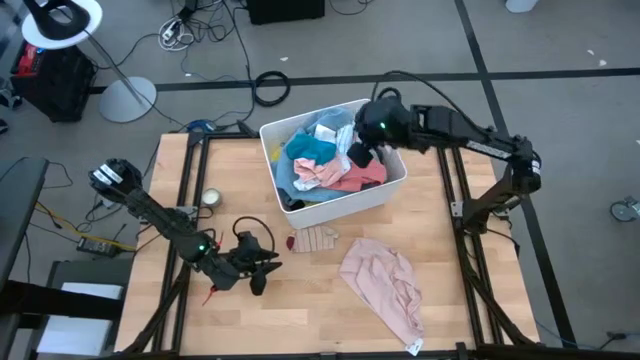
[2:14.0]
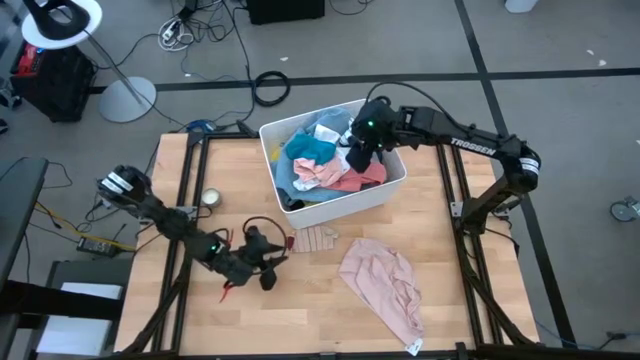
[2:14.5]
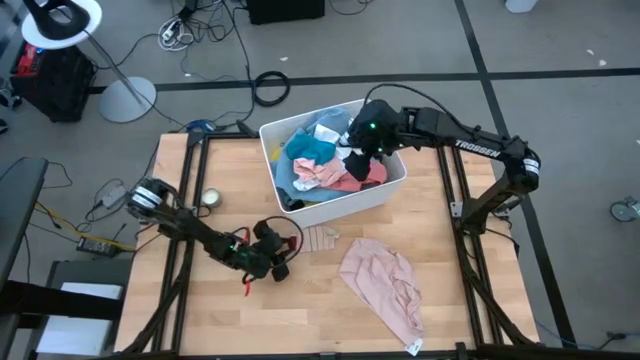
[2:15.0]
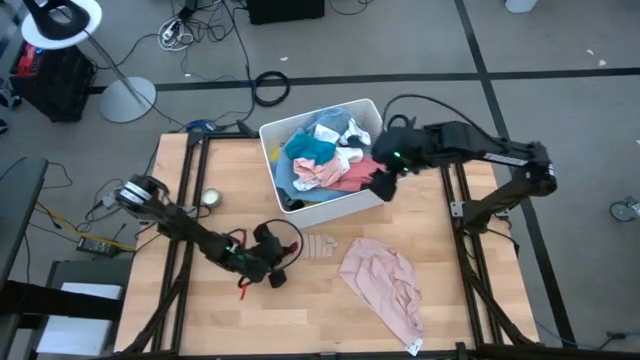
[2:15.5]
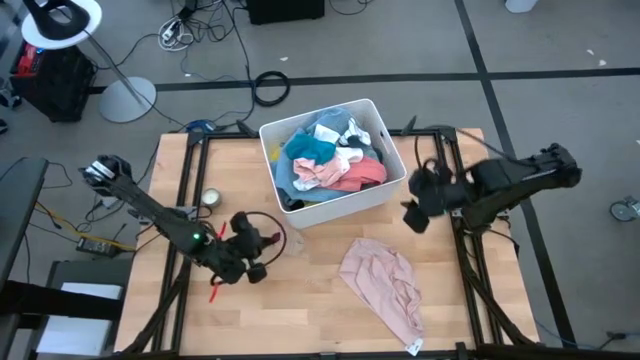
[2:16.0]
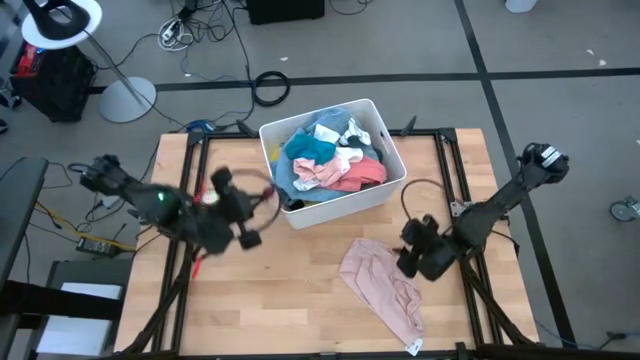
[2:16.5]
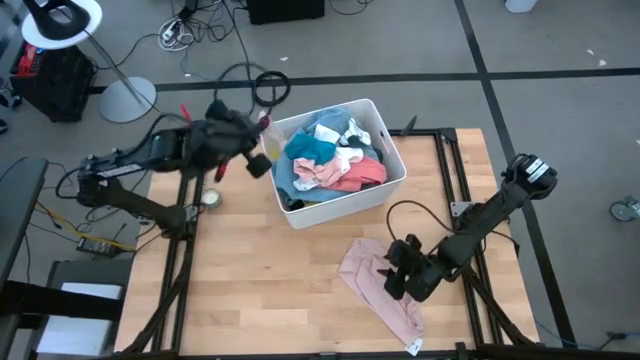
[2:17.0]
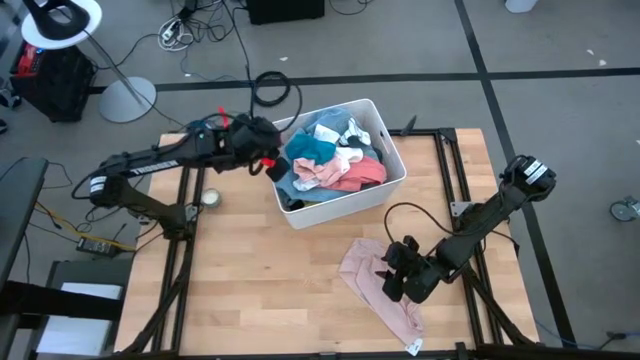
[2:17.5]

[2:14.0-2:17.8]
Task: Sort clothes
Put the pink striped sock into the white bin

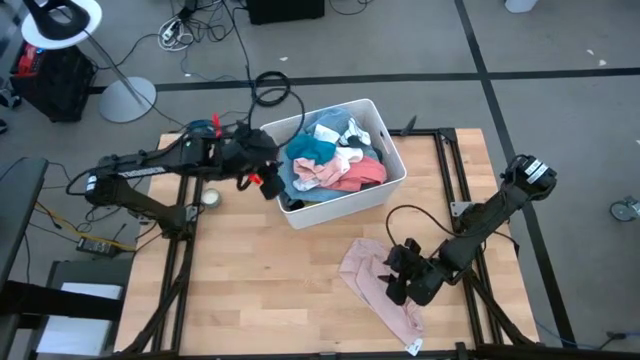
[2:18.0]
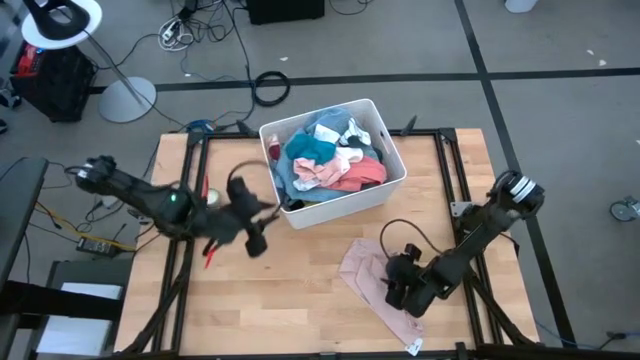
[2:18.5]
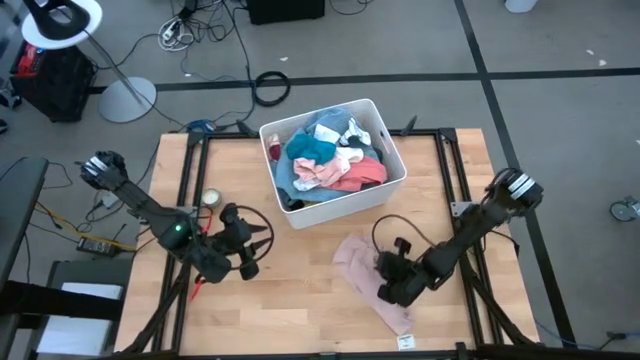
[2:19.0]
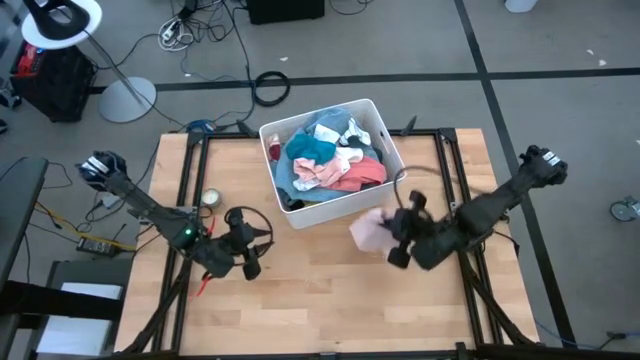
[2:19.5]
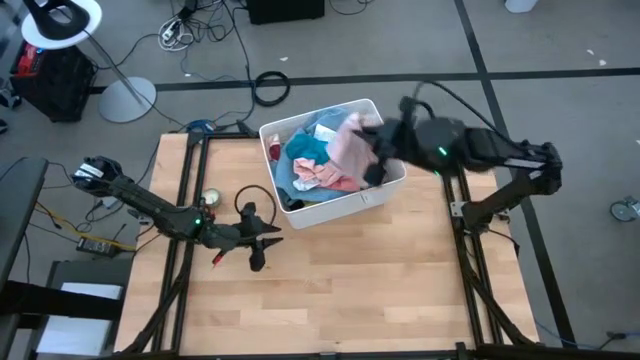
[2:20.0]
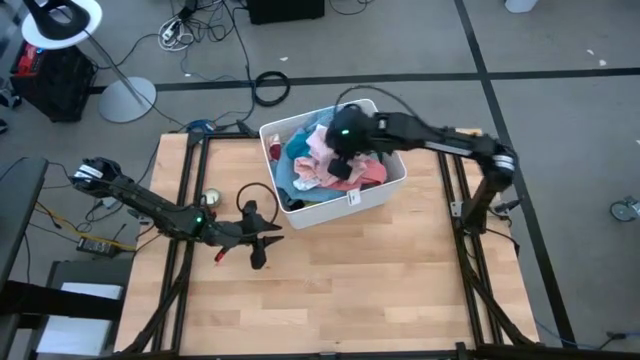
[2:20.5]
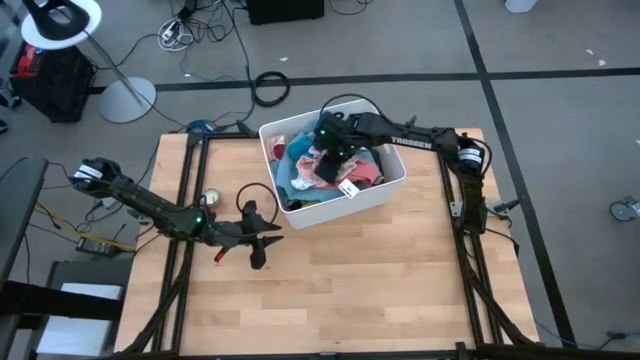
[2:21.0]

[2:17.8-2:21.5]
Put the pink underwear into the white bin

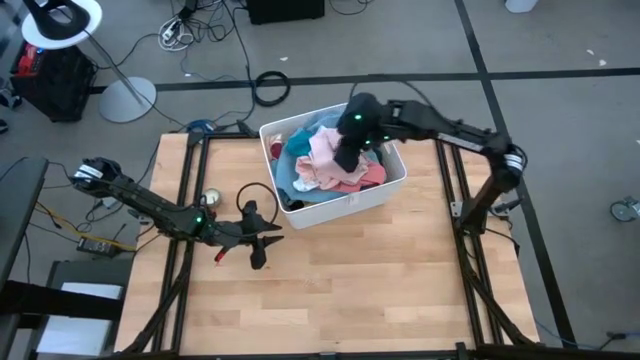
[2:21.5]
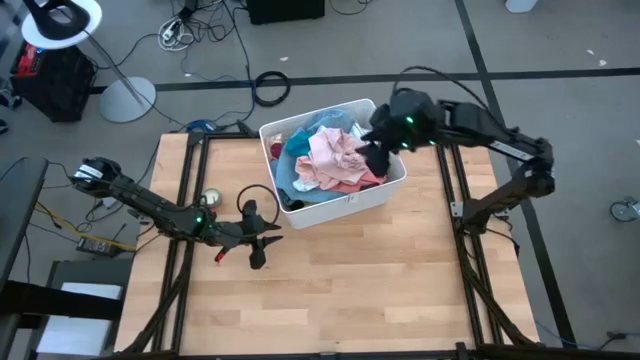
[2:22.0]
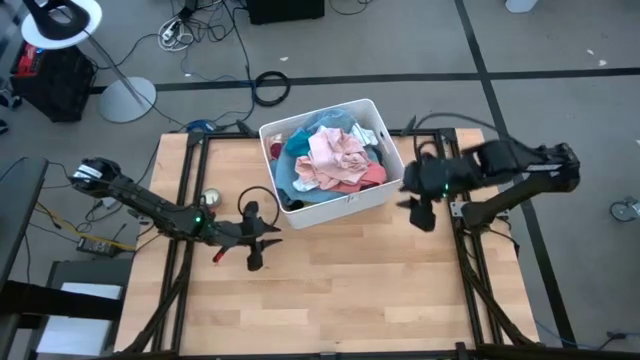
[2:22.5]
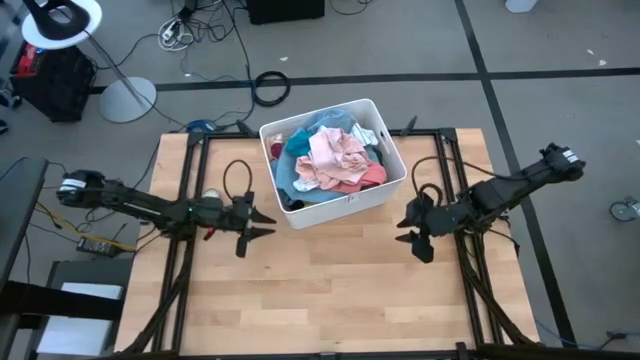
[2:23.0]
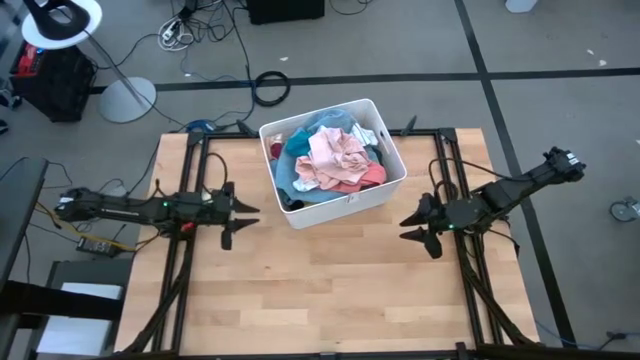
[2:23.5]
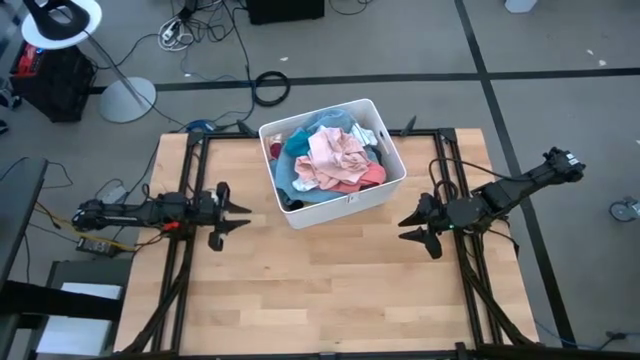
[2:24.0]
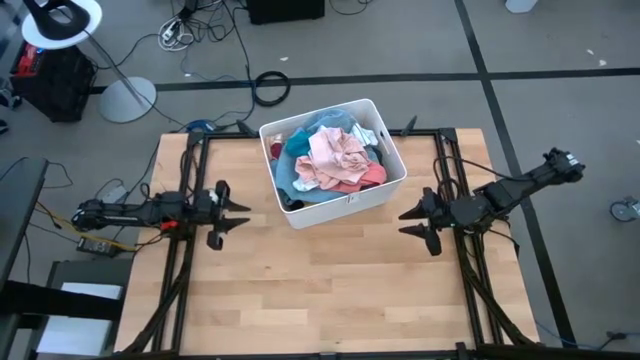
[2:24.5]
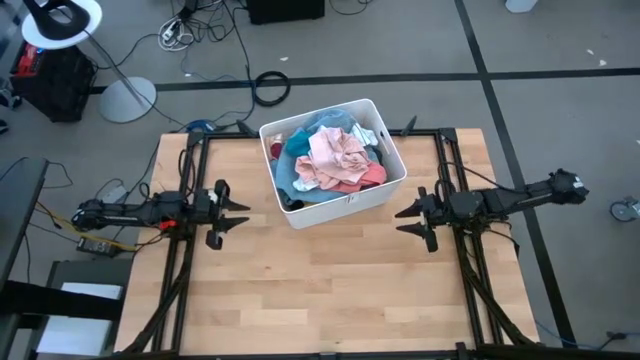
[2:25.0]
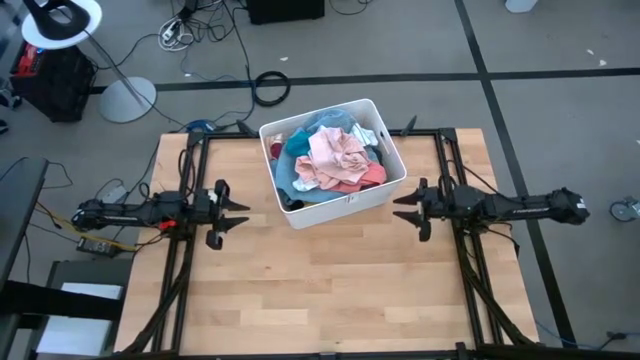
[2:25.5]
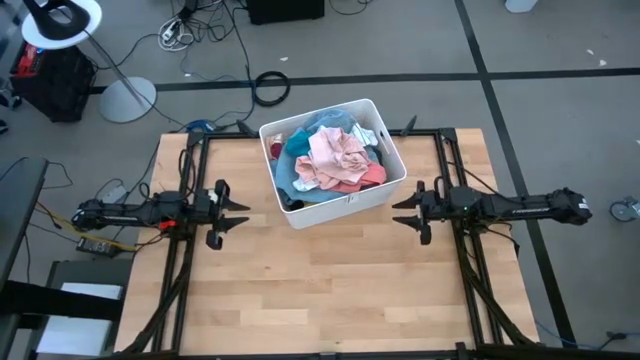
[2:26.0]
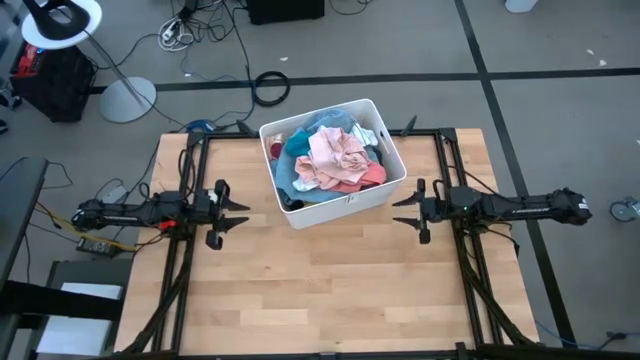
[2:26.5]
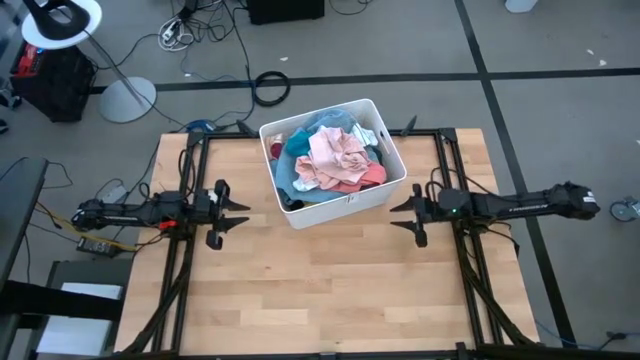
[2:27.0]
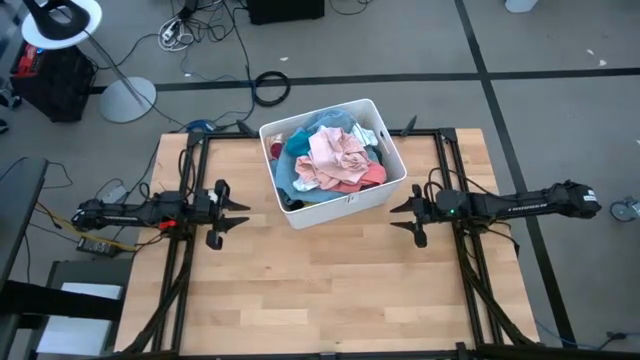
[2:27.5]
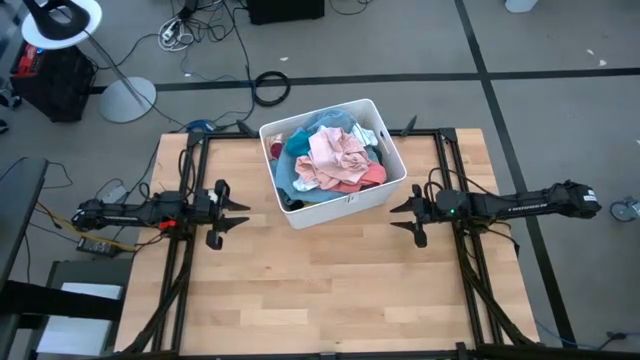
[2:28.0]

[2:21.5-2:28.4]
Return to Home Position

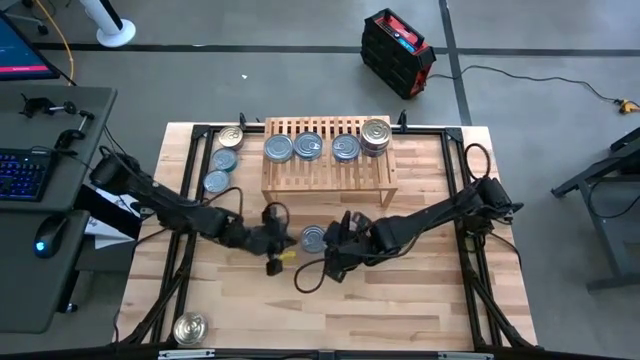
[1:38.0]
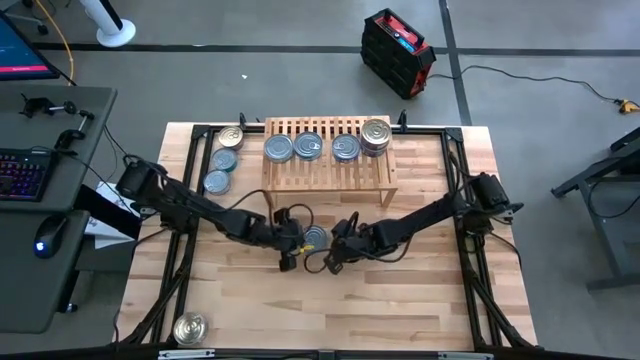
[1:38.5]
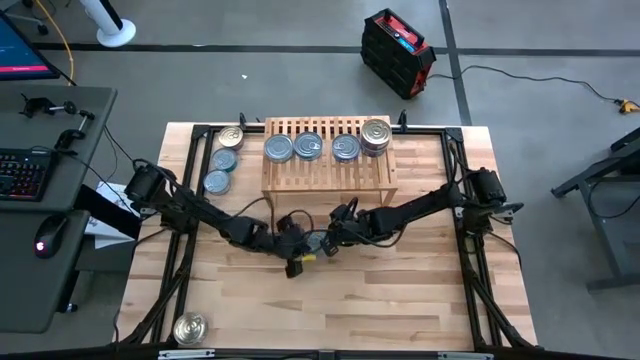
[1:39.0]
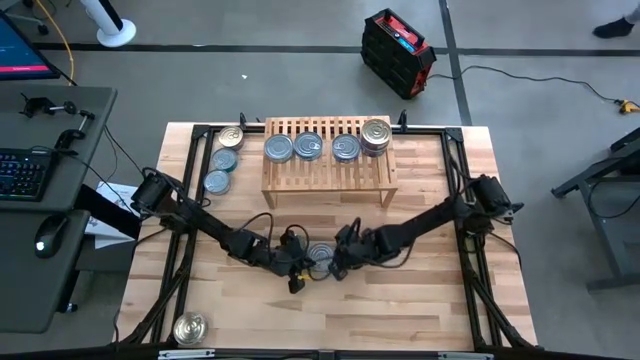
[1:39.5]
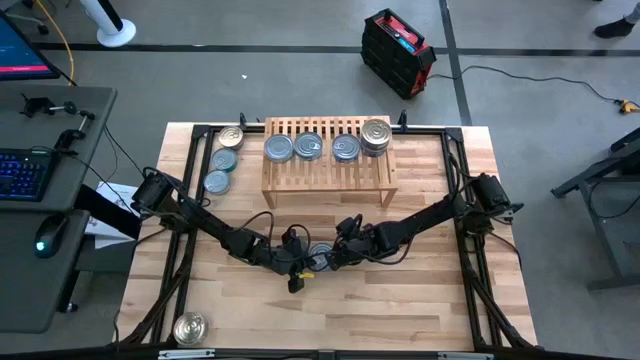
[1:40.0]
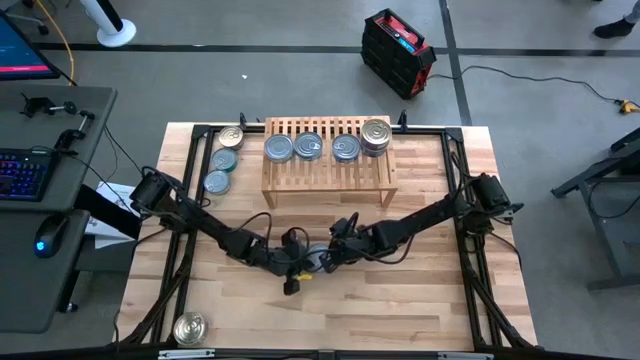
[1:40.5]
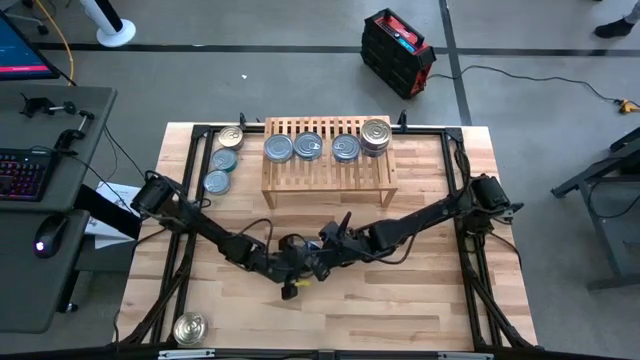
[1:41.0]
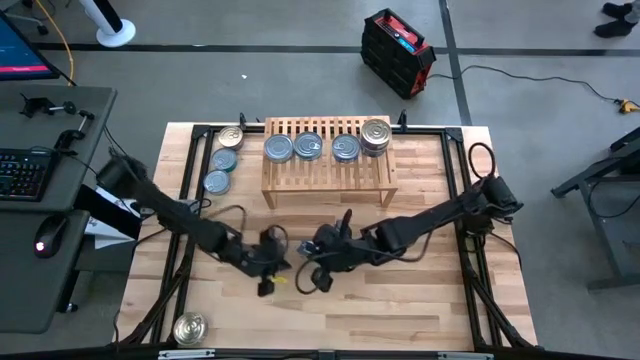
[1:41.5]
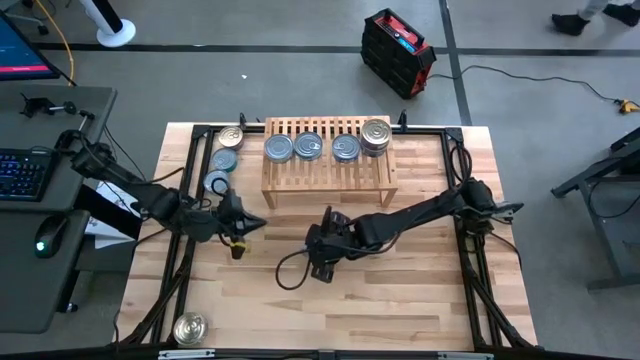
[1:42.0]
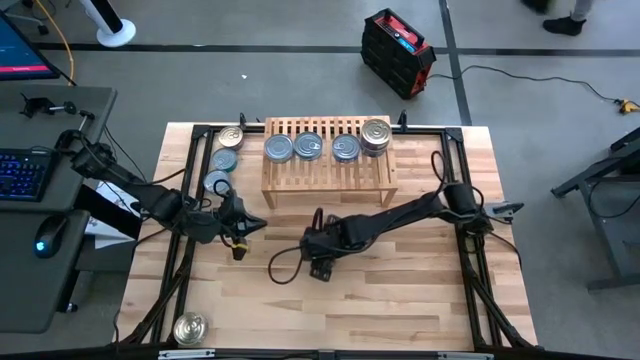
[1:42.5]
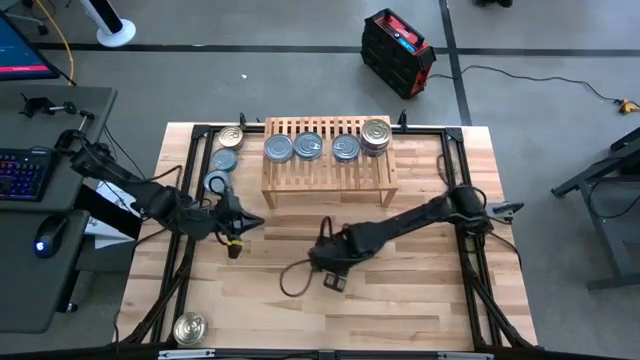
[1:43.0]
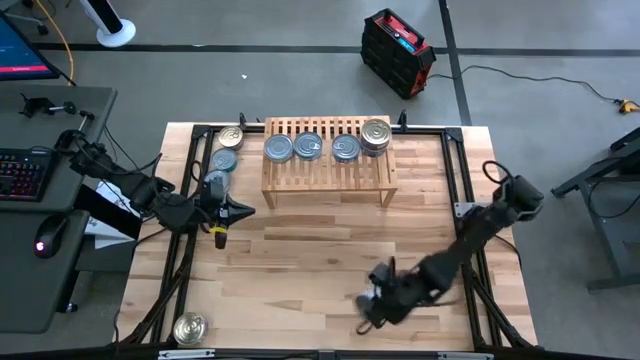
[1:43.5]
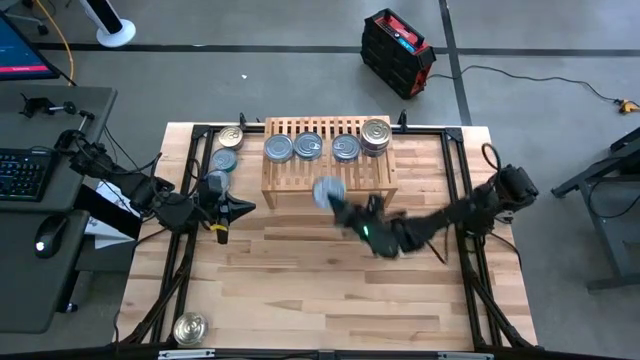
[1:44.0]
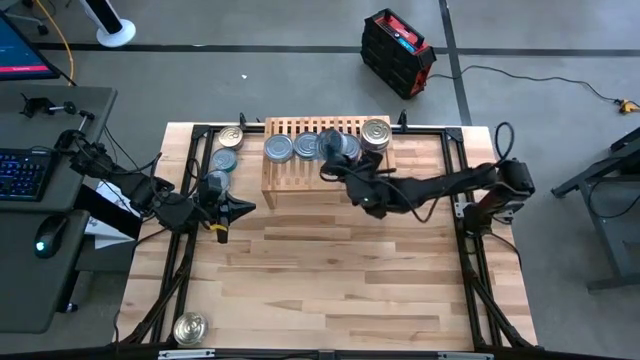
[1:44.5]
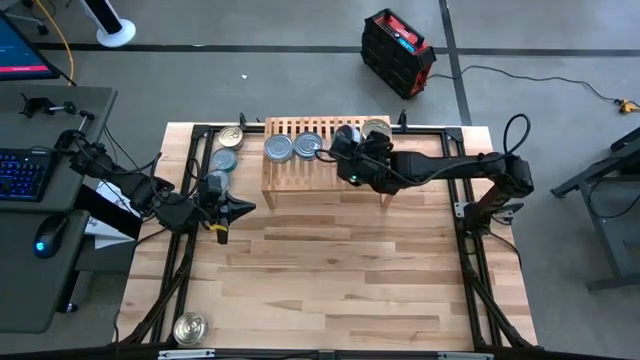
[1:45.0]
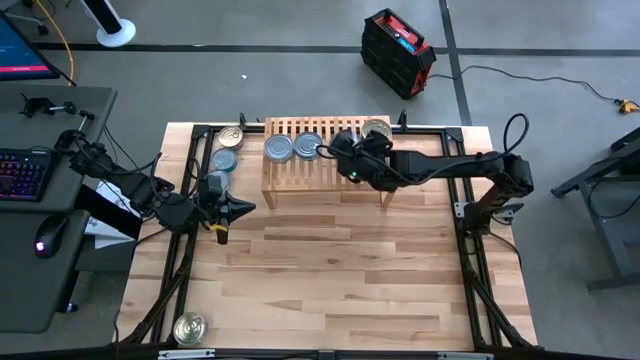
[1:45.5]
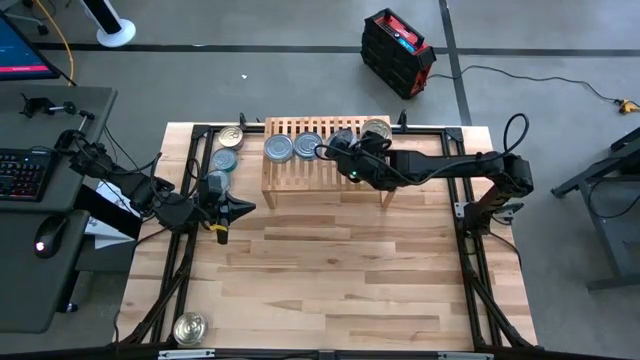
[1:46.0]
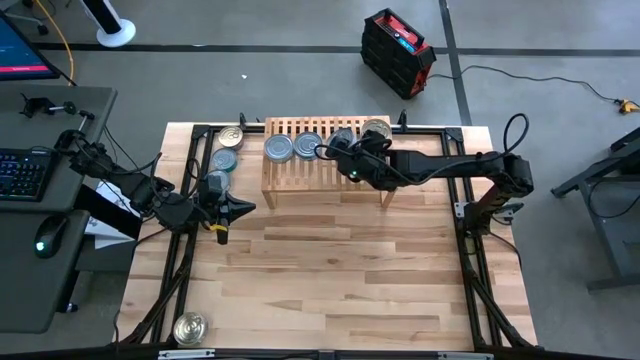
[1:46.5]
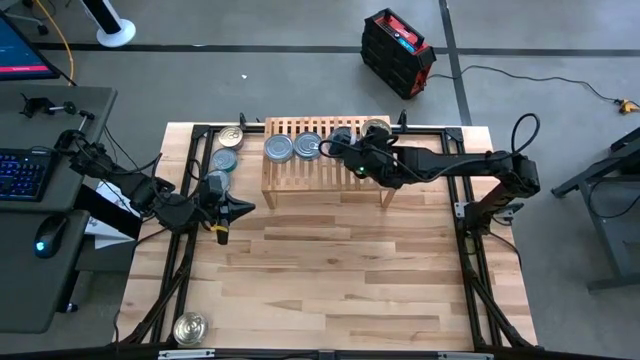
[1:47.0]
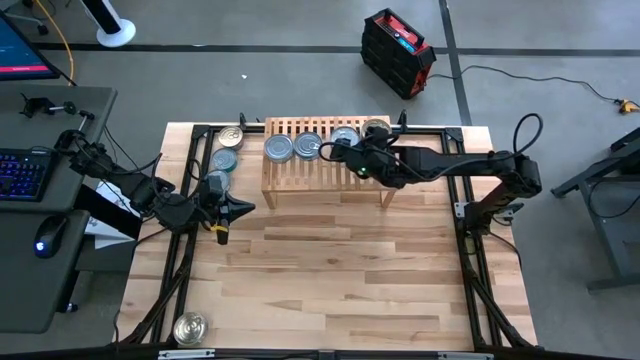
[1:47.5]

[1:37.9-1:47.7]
Task: Stack canned seafood by type on shelf
Stack the blue tuna can on the blue tuna can on the shelf
